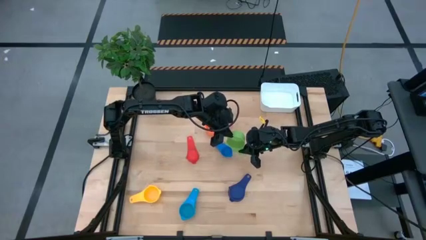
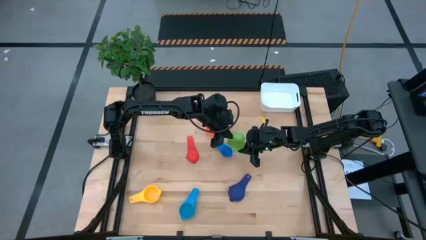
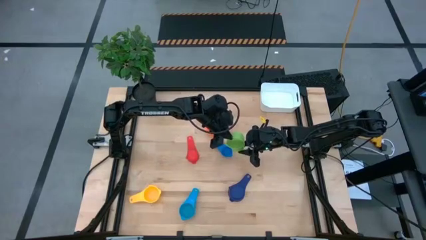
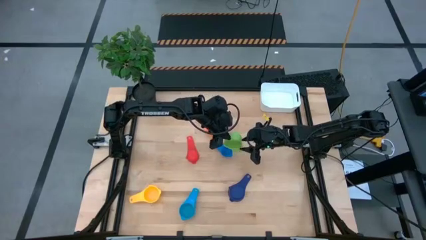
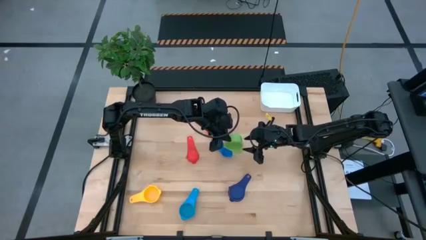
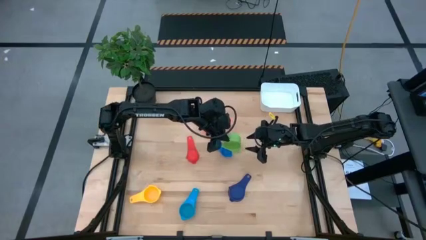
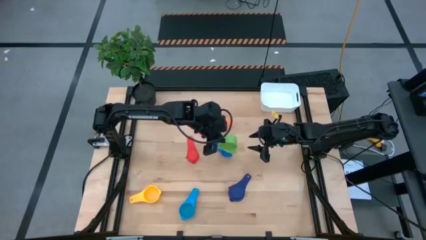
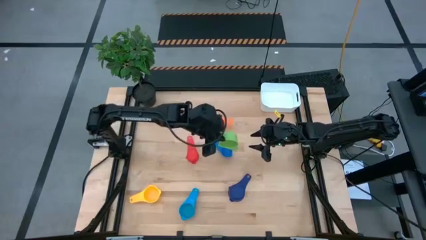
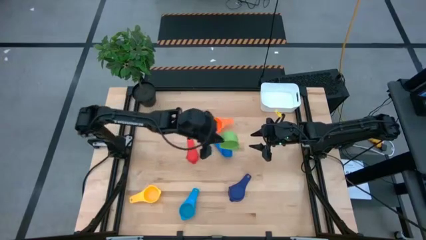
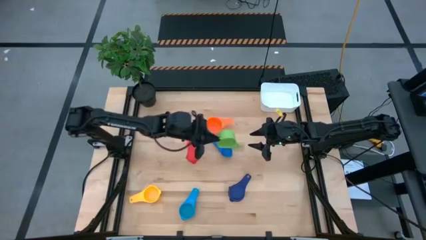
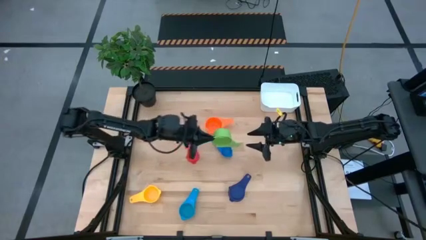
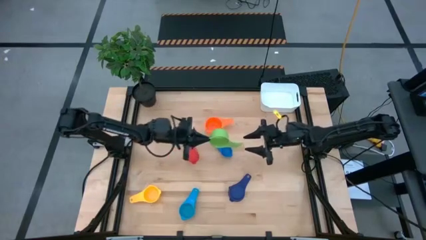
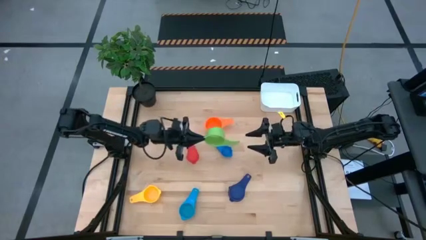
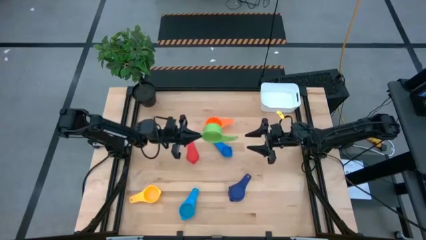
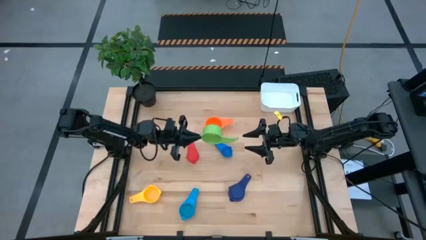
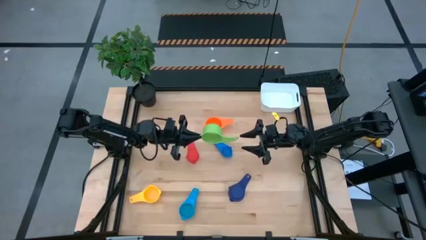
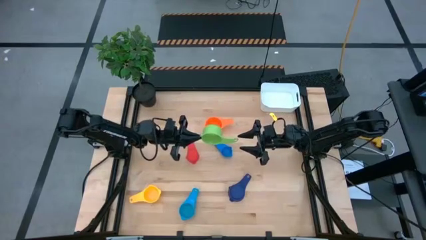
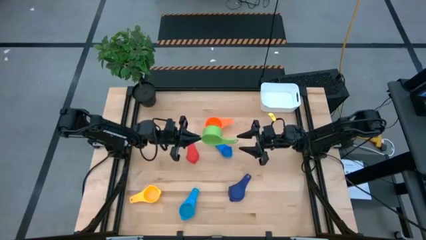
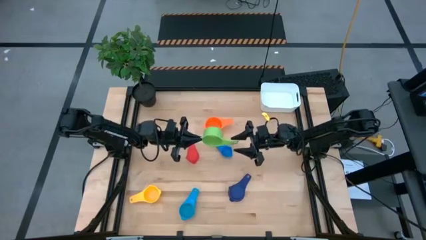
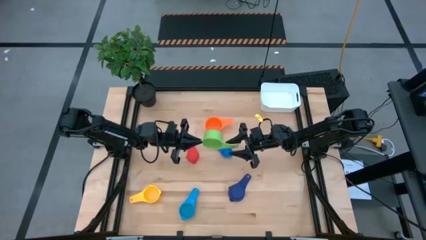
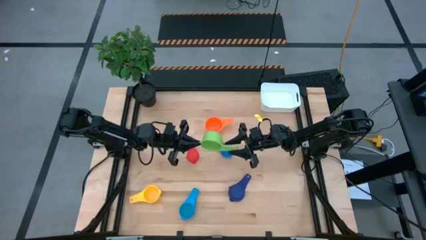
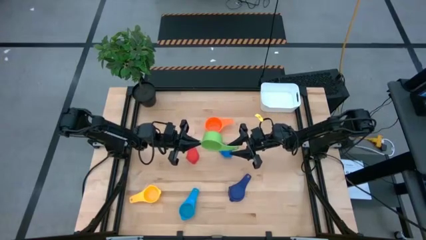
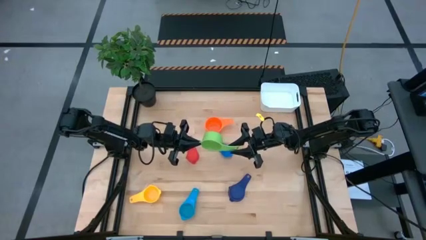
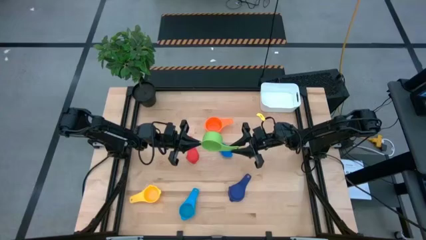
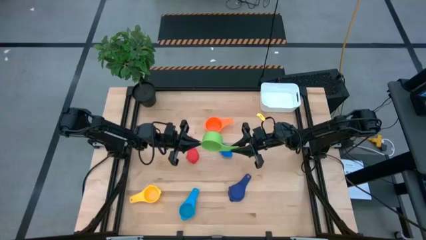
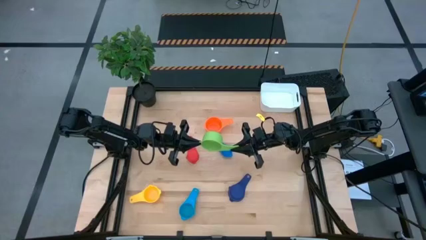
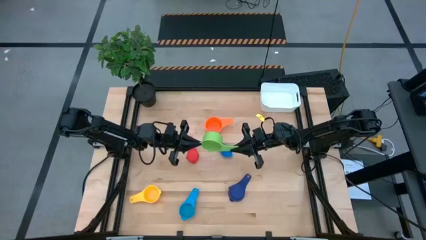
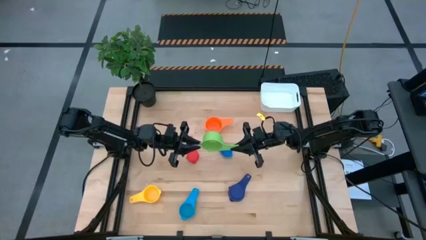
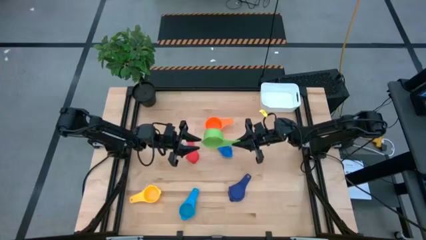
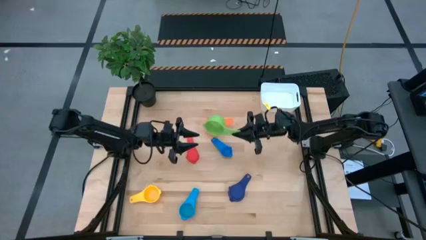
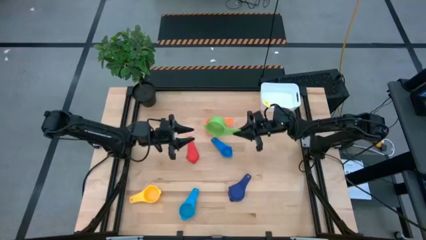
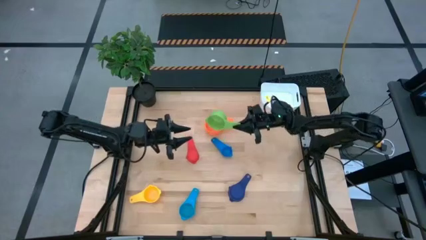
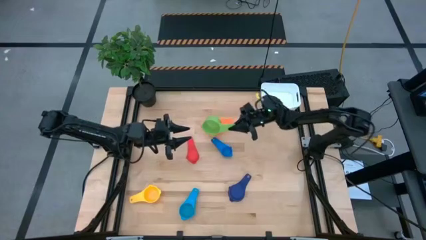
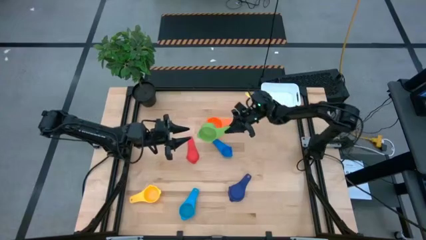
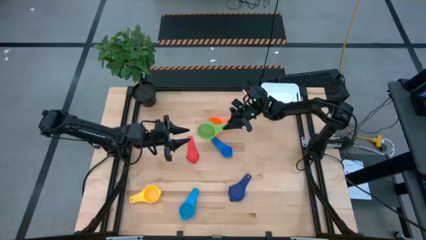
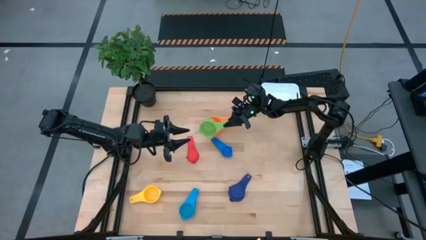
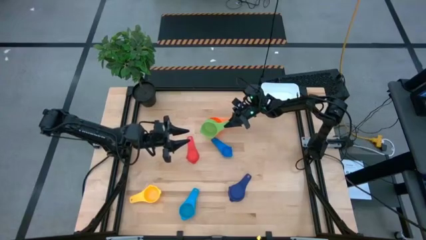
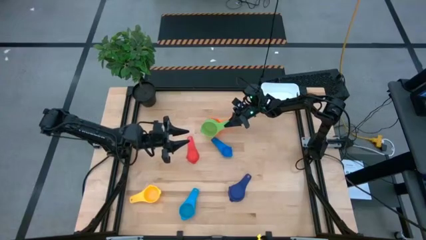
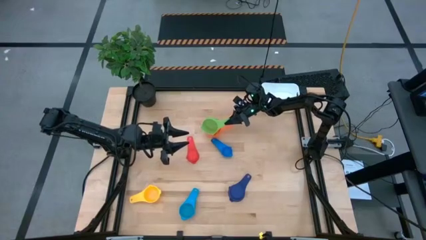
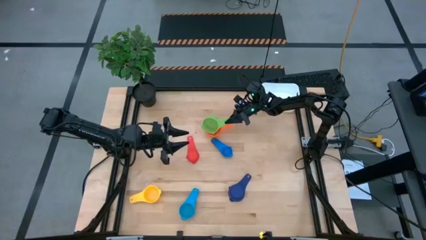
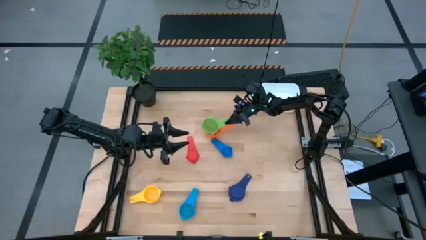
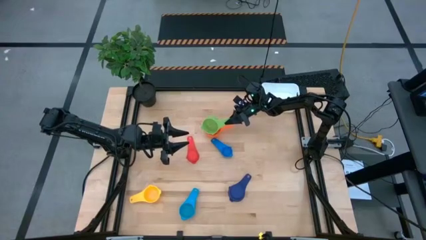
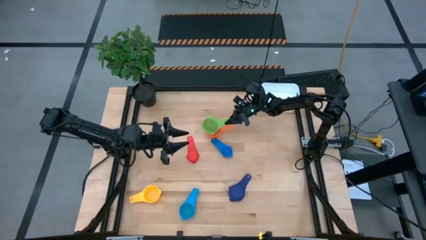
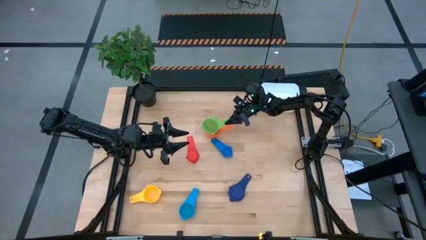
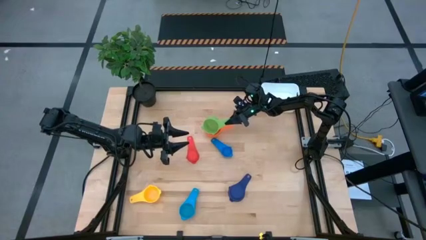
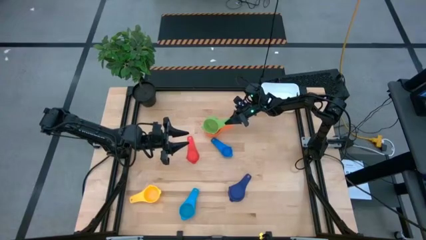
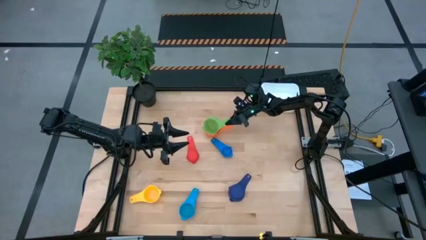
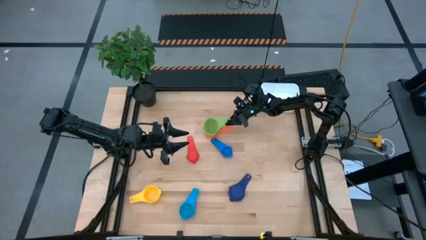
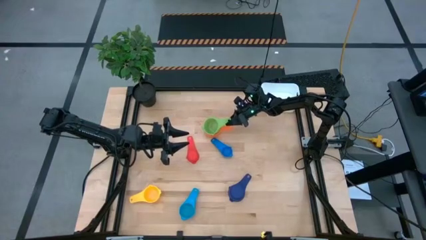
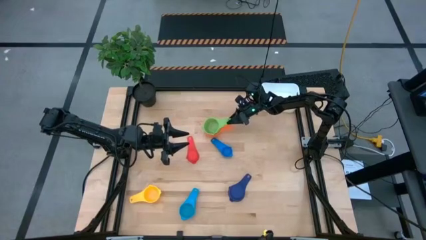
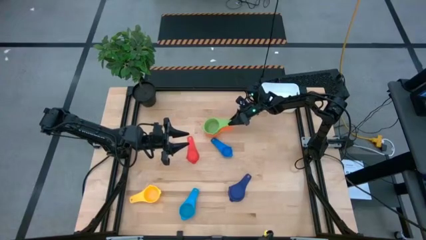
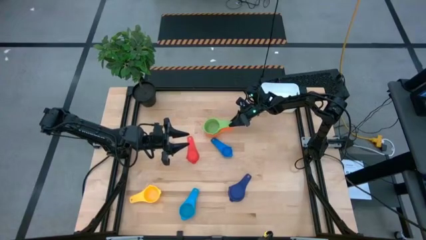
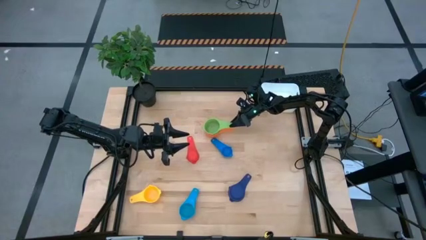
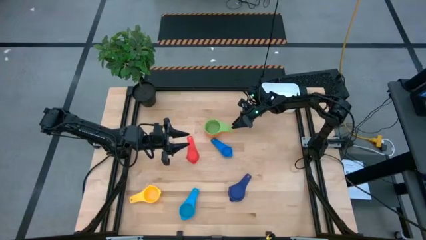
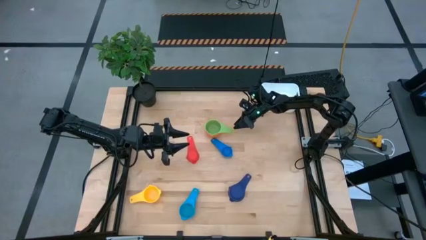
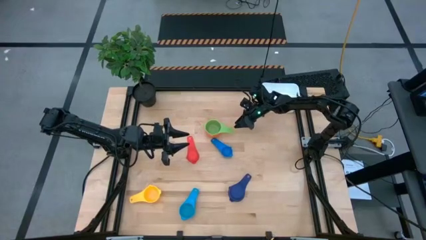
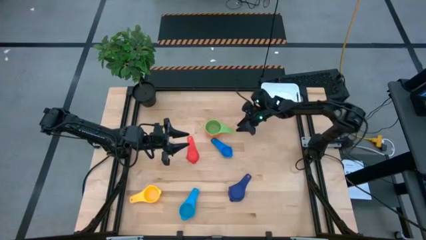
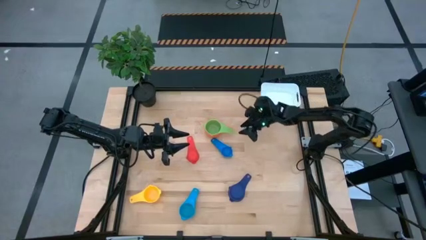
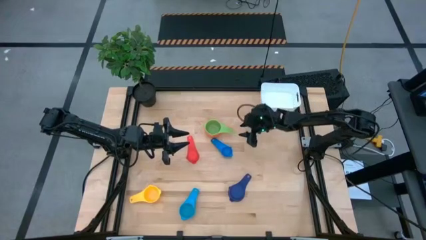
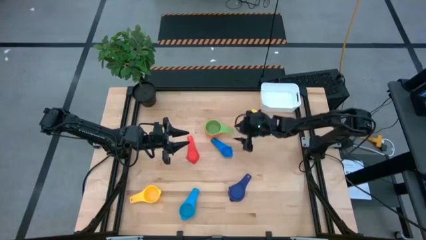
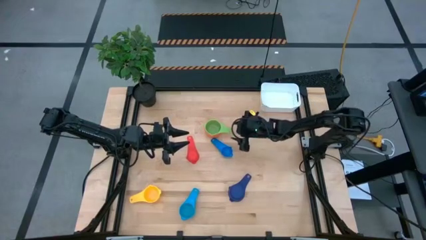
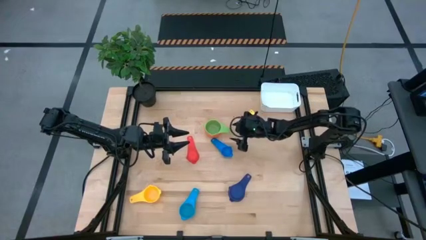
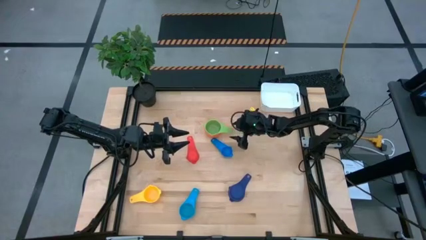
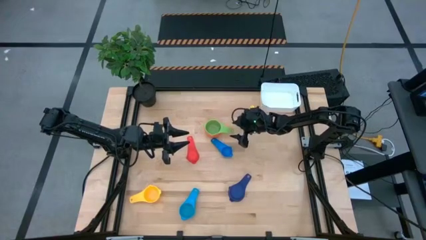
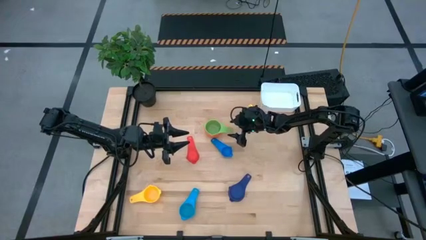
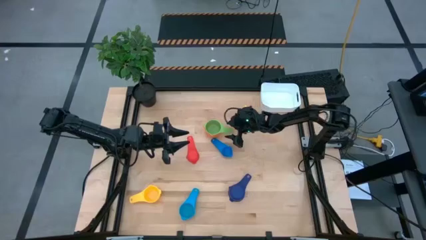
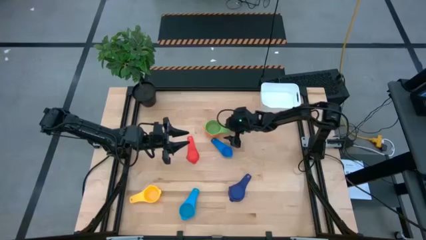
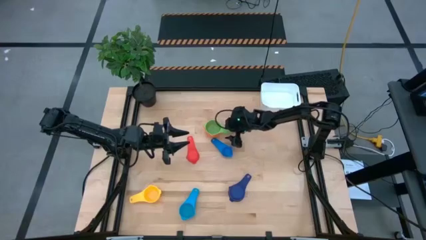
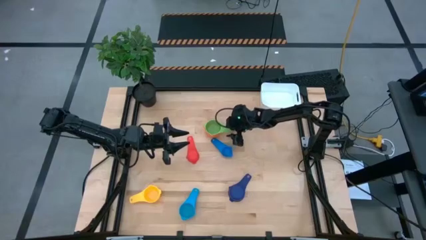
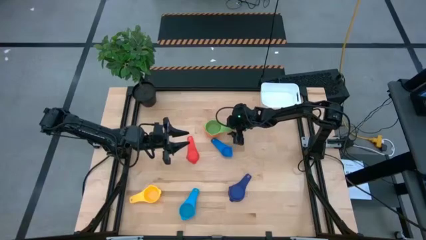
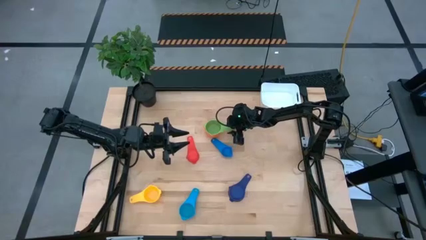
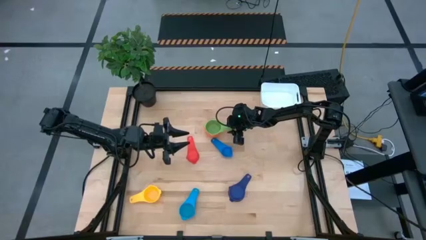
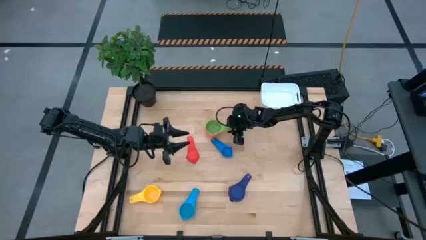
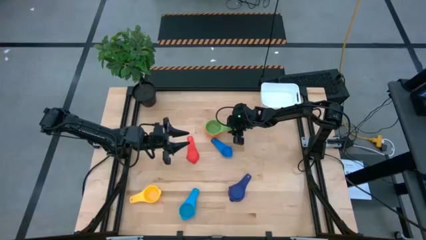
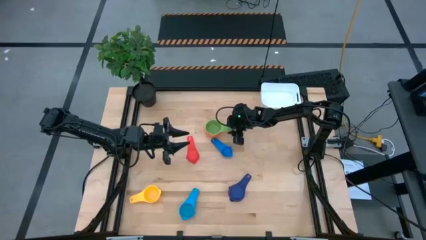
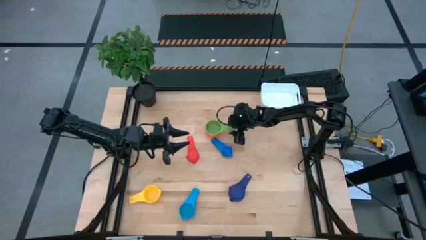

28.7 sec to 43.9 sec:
Task: Nest measuring cups in basket
Stack the green measuring cup into the orange measuring cup
